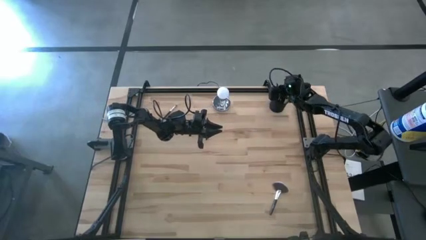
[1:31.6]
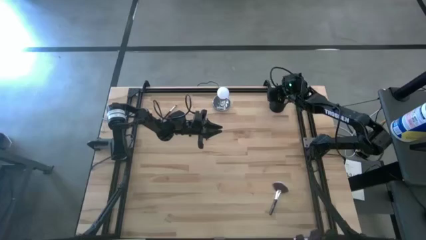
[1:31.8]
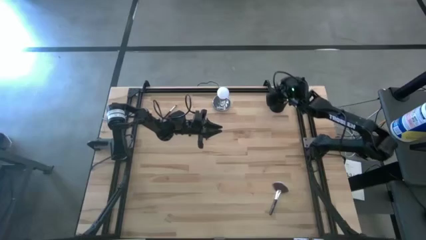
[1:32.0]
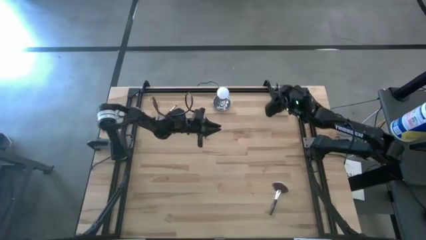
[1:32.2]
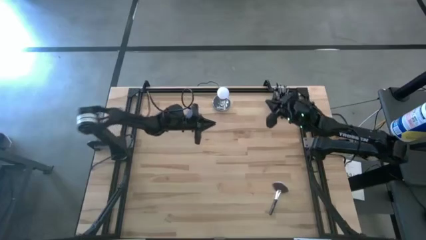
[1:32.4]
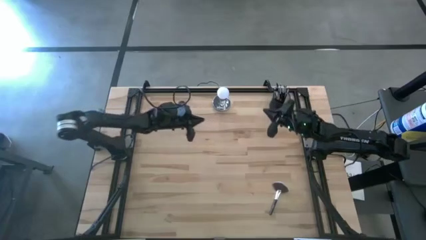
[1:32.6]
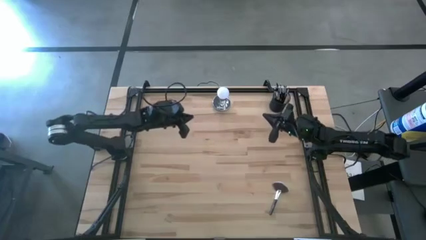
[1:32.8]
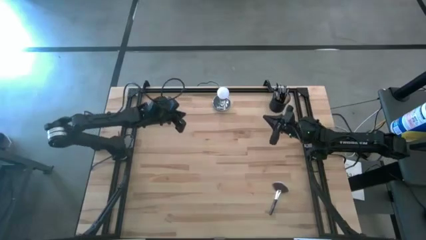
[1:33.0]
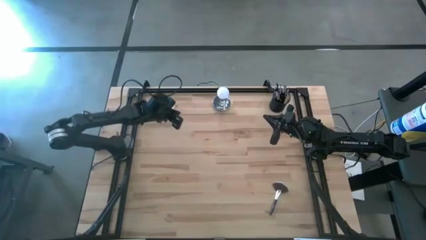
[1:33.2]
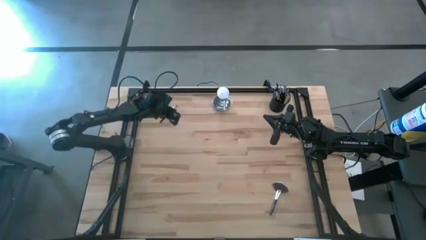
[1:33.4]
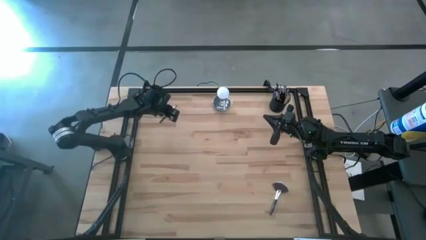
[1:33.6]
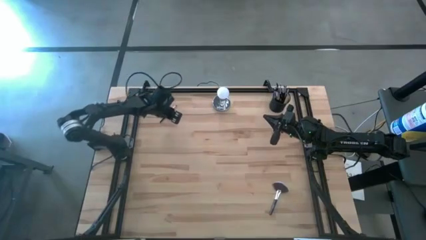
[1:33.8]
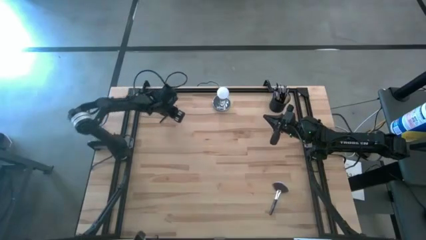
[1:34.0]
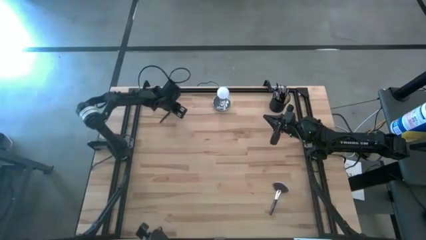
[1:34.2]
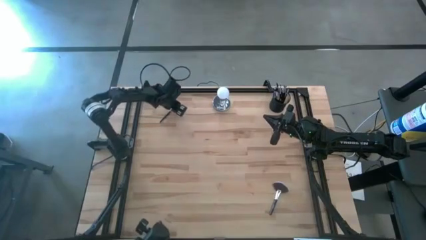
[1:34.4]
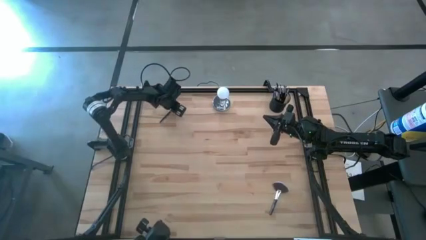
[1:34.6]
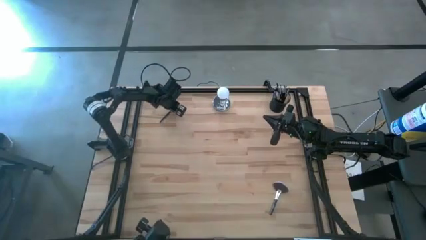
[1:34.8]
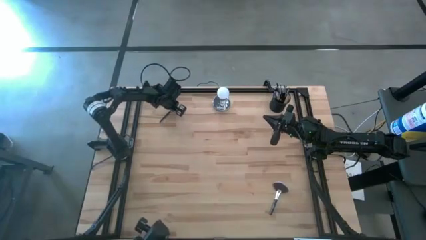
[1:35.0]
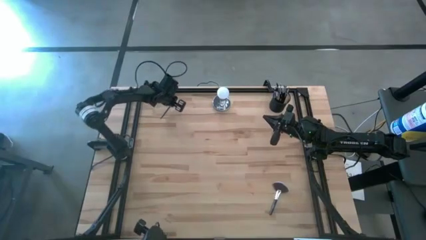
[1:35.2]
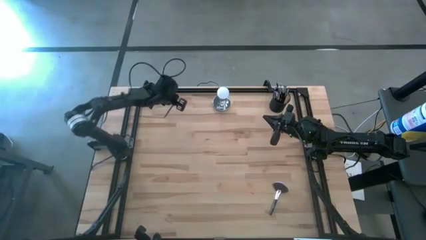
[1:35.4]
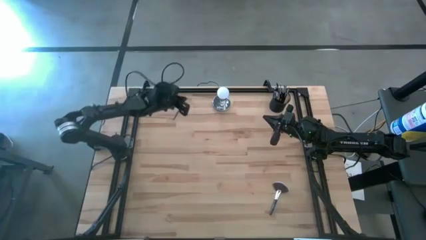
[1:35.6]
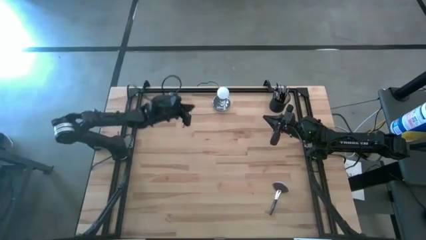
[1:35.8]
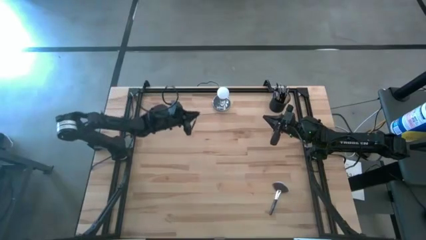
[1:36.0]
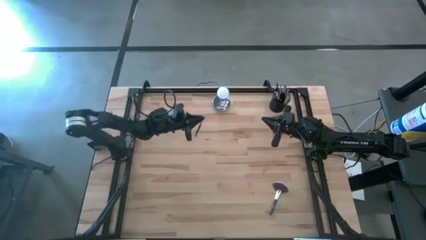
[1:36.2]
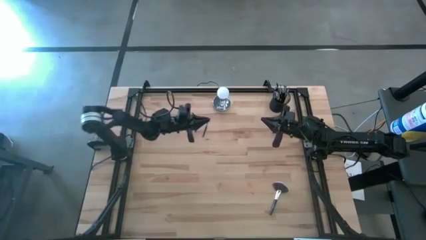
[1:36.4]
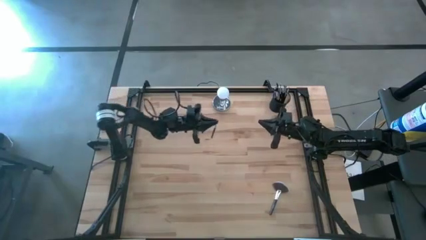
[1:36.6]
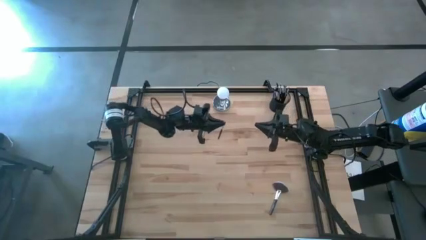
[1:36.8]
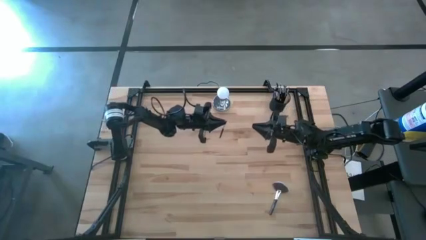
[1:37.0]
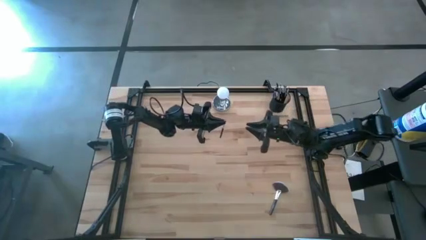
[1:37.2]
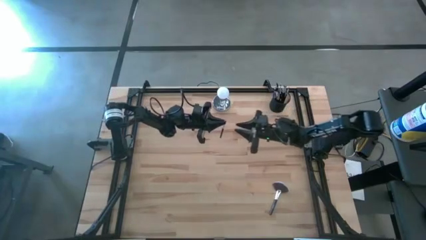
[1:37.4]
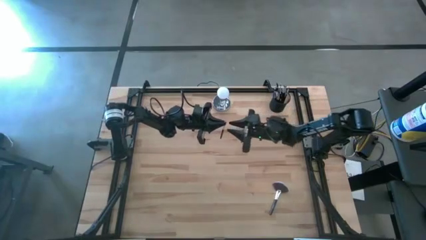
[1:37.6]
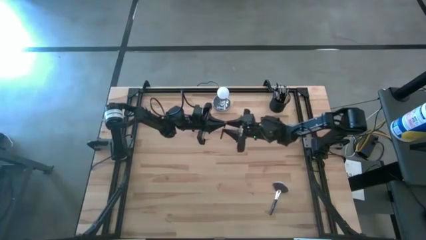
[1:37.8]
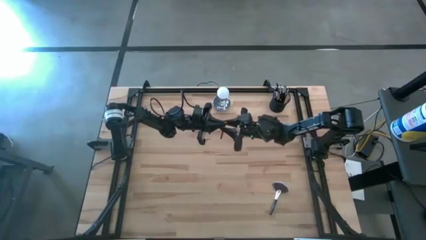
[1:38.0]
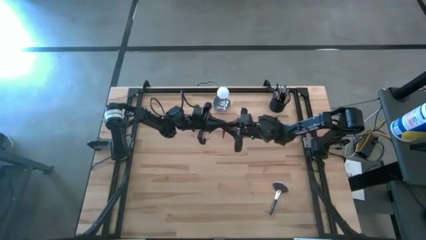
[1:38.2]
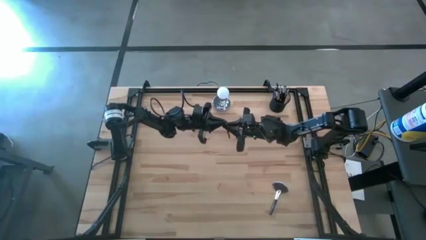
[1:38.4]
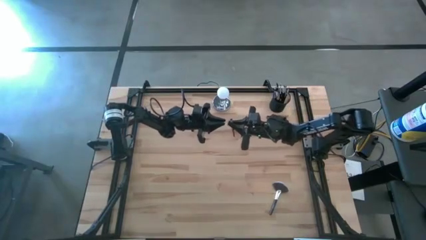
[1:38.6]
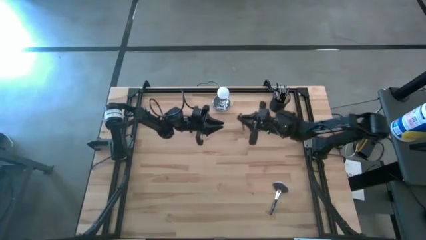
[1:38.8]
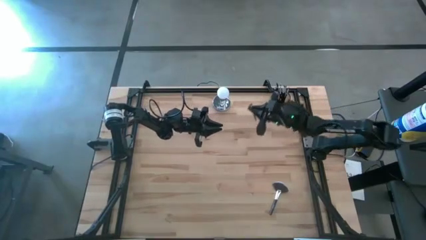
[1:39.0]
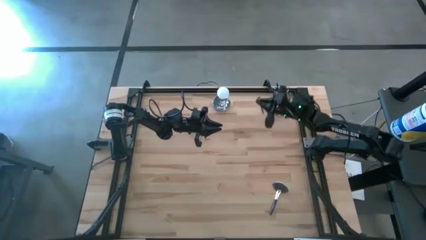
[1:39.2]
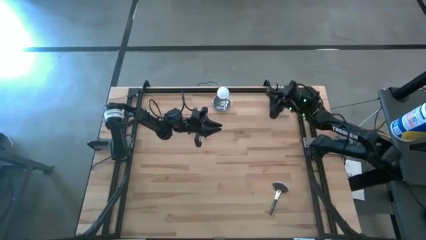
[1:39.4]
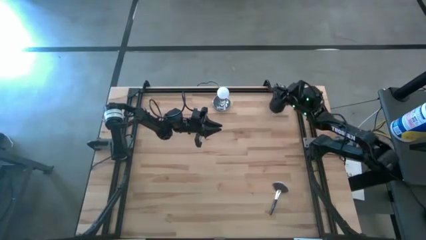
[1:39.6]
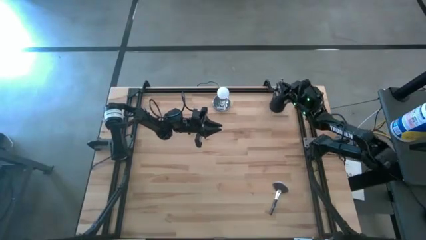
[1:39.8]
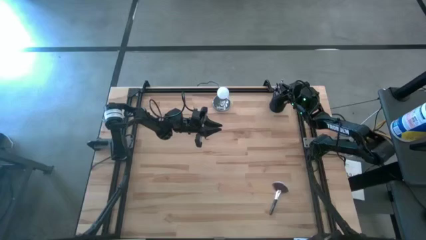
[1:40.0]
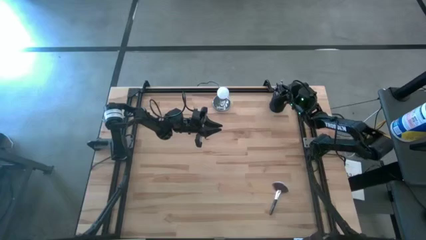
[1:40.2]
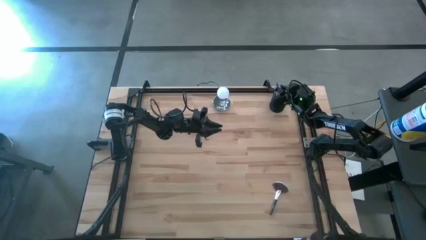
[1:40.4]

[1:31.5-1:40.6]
Task: Put items in baskets/containers
Put the black eyeshadow brush into the black pen holder

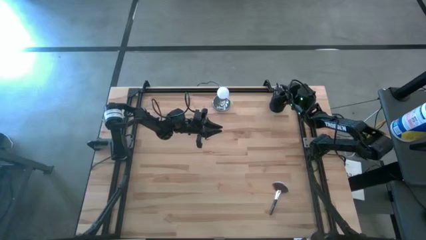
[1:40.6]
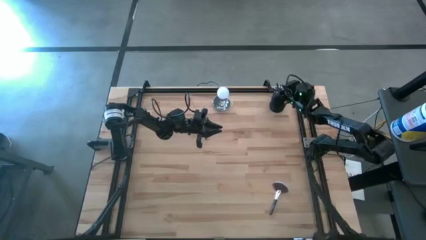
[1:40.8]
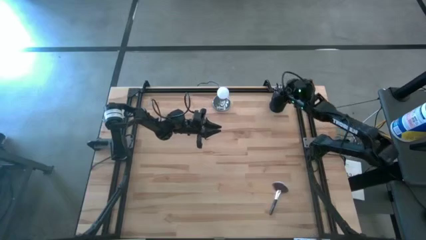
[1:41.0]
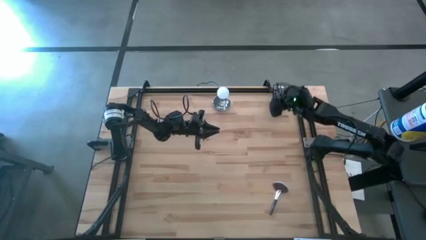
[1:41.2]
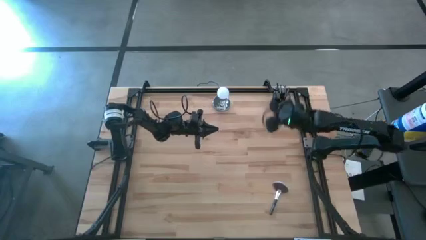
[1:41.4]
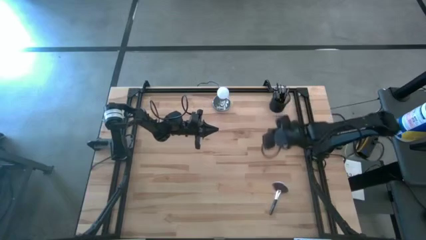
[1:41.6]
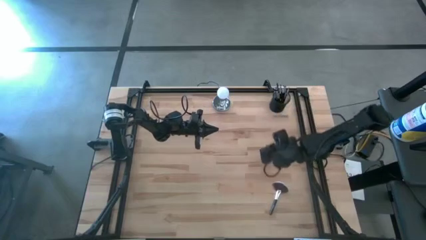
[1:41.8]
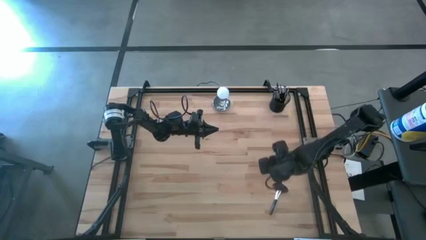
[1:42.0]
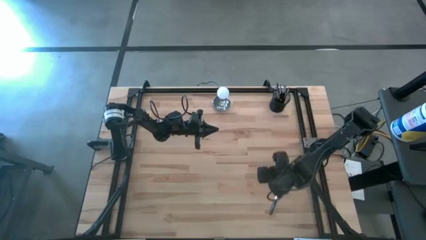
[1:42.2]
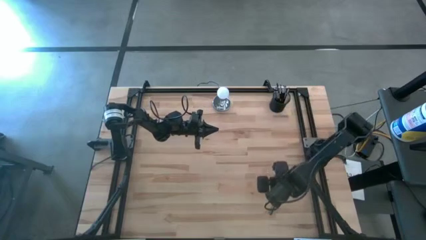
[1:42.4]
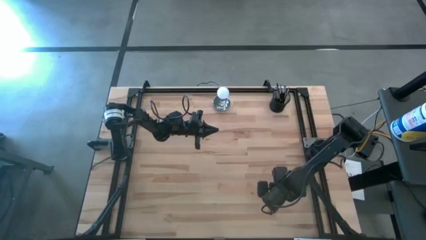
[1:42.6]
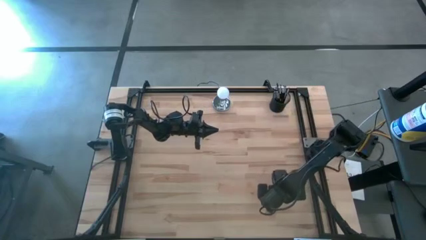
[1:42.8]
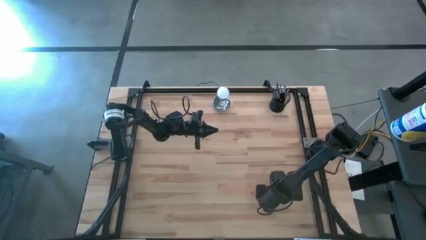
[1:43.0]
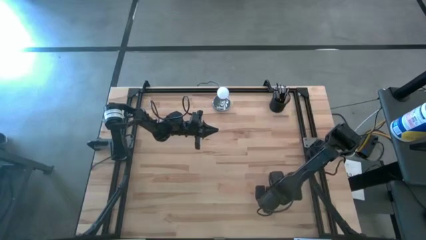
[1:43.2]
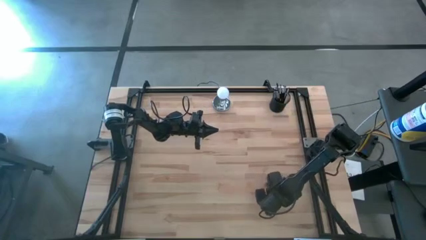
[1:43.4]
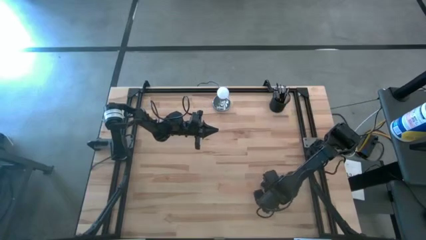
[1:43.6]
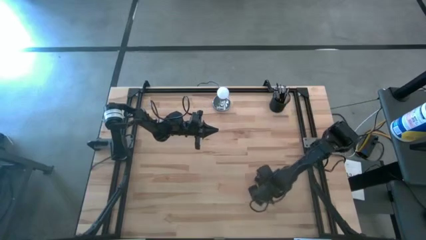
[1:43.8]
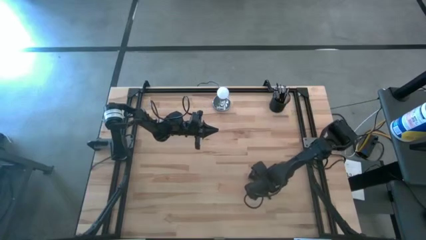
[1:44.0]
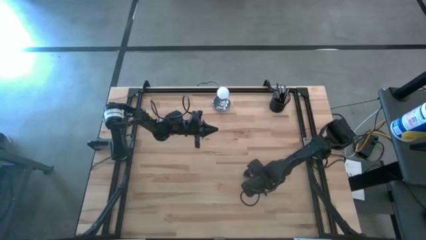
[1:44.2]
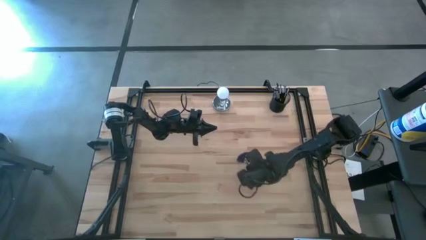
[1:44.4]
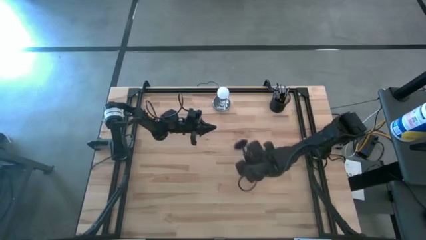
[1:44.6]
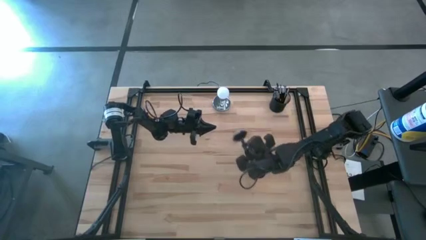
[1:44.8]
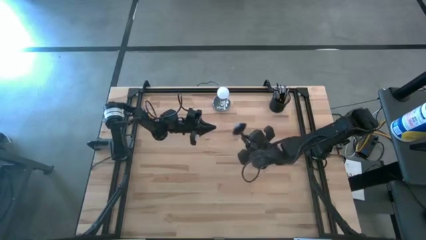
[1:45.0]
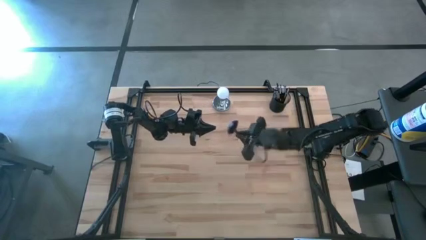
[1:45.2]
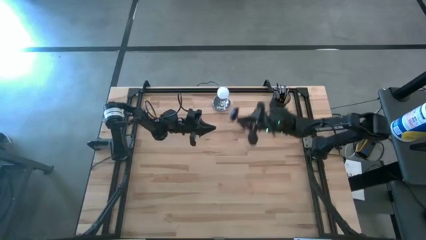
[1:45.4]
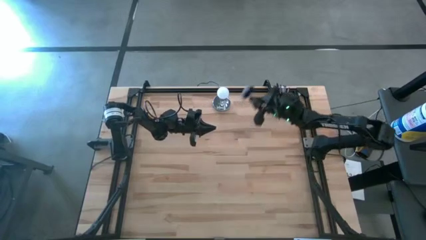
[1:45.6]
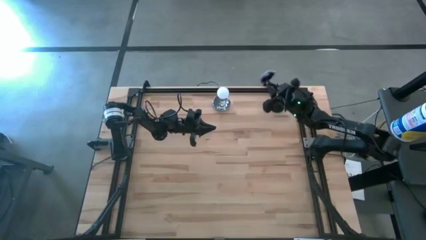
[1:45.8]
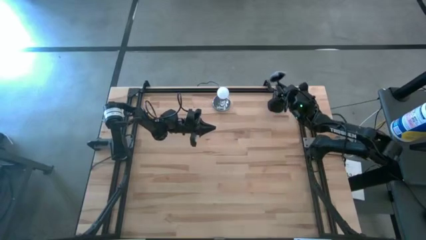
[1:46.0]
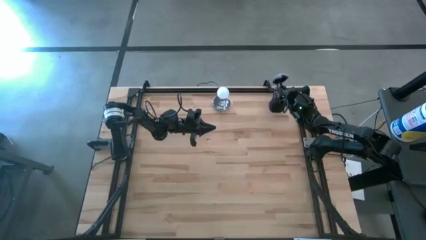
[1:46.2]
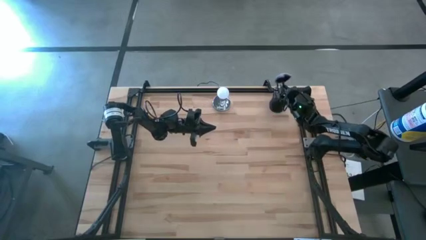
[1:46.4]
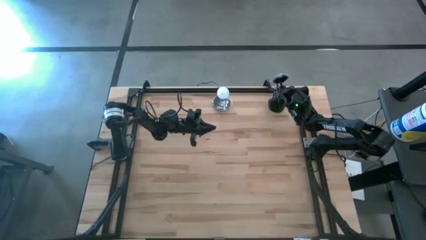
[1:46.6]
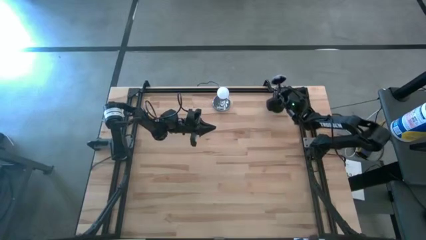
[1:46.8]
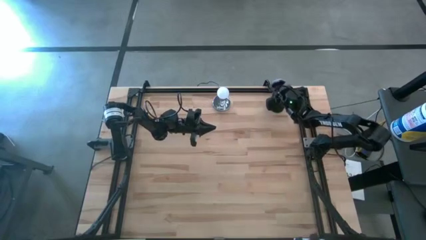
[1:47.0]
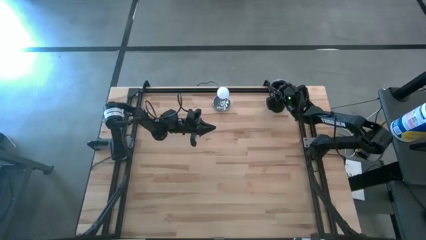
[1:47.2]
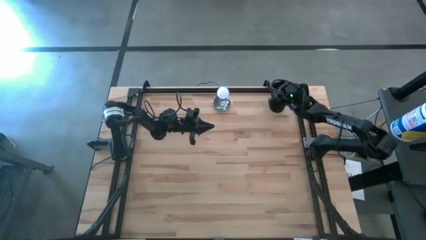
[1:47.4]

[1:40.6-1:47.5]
Put the black highlighter brush into the black pen holder
